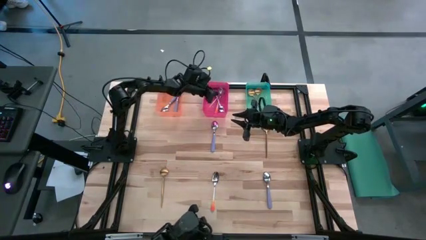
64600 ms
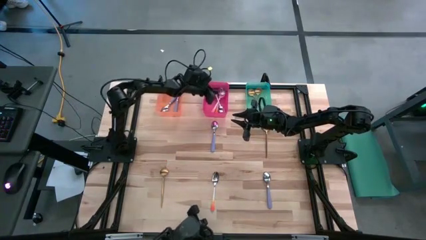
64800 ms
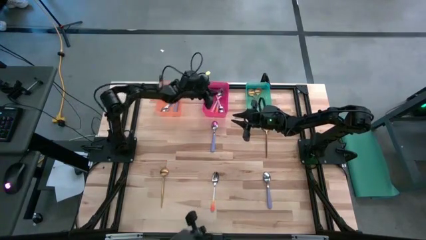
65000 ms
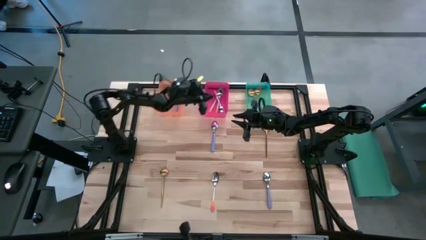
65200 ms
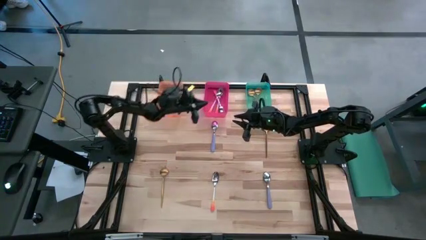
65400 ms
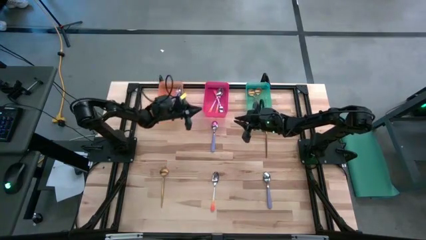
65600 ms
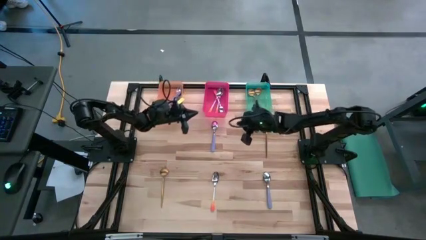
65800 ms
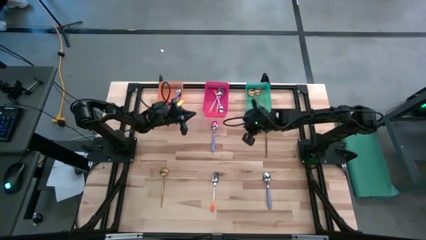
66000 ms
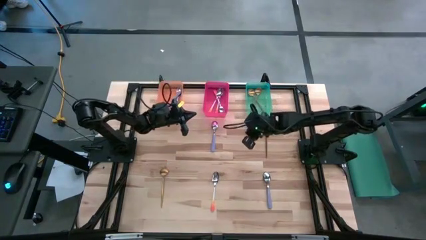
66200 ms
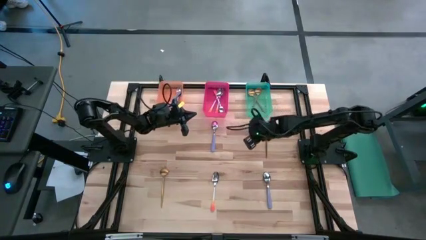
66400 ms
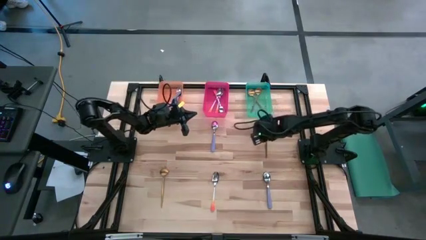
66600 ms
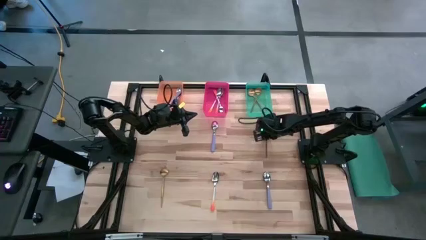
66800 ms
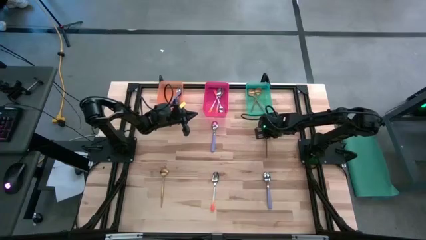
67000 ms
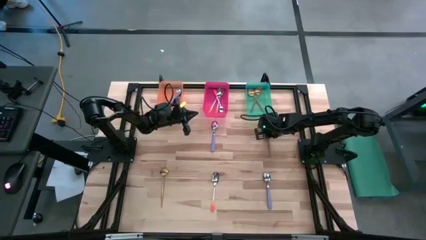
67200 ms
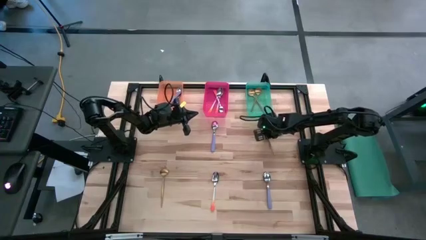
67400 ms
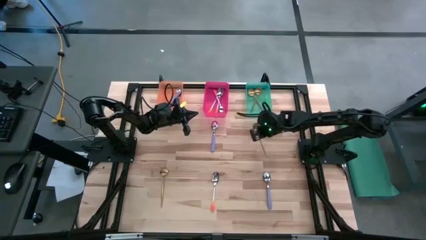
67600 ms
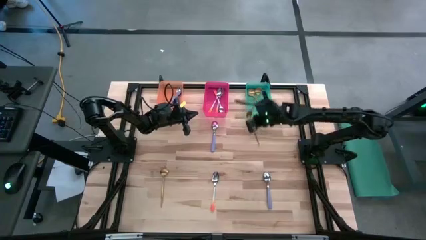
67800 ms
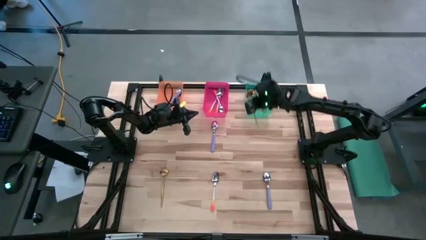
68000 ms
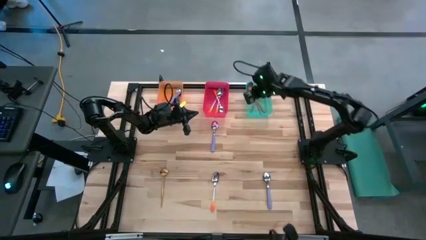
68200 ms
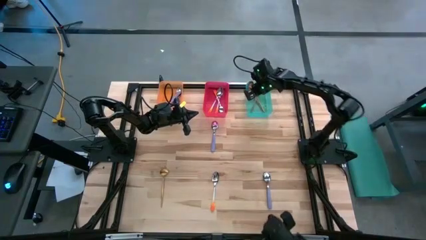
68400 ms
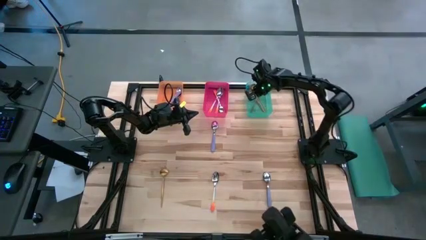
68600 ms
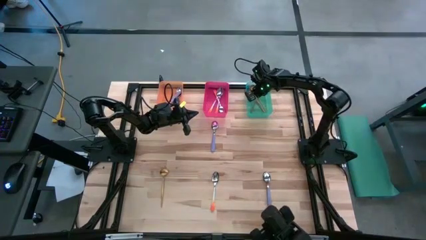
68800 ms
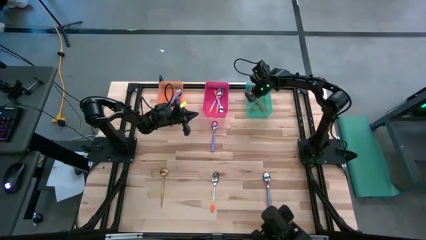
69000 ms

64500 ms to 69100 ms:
Task: Sort silverware by color (type)
Put the golden spoon into the green bin

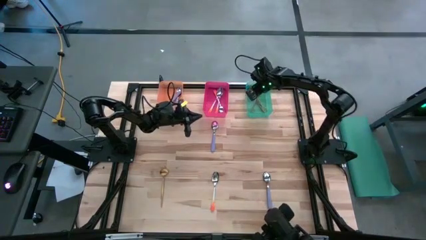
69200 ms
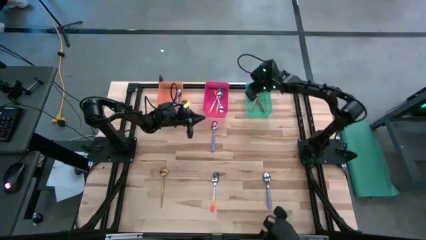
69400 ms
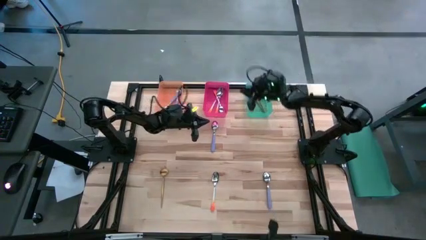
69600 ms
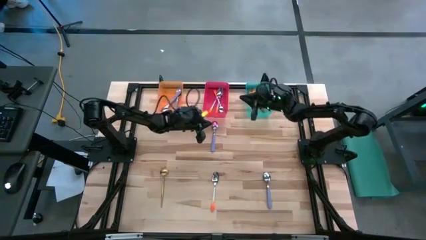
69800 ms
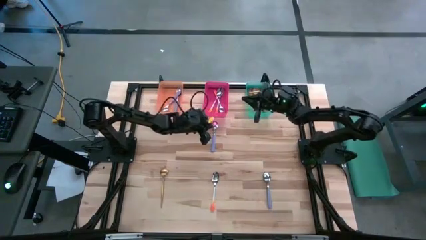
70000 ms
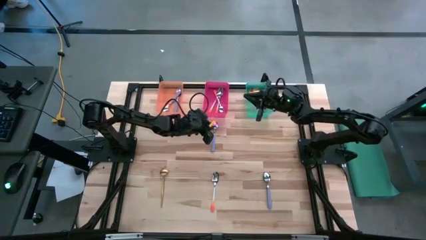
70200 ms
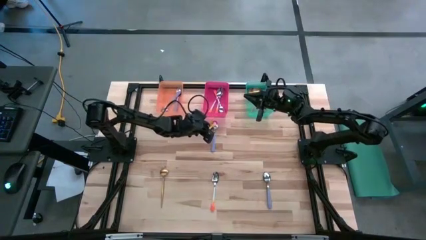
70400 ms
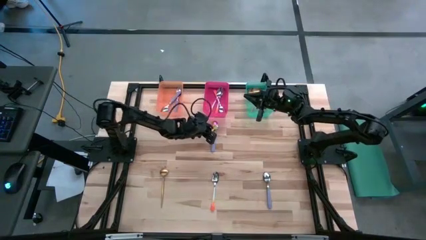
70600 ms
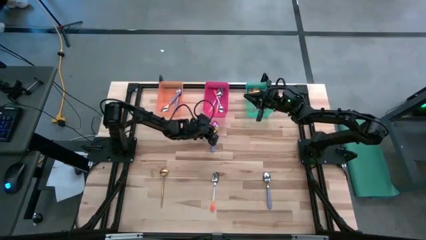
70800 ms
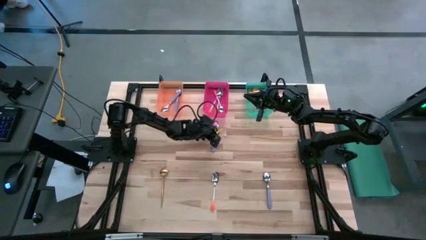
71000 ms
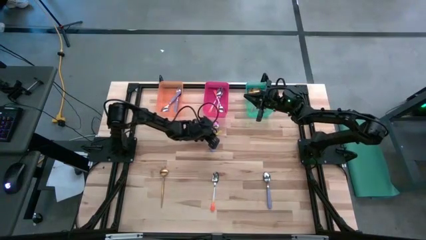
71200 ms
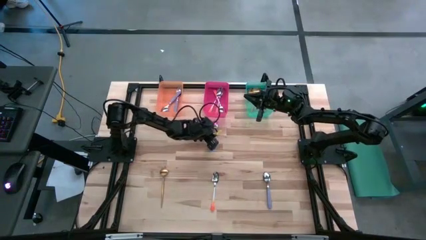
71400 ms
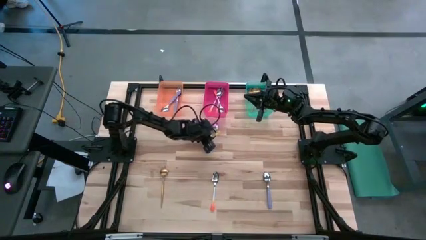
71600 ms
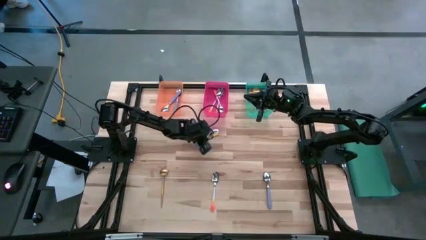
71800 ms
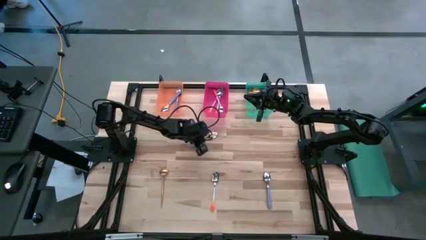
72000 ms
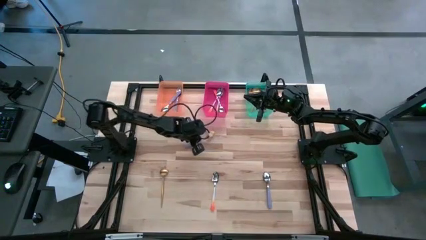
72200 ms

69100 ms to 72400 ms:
Put the purple spoon into the orange bin

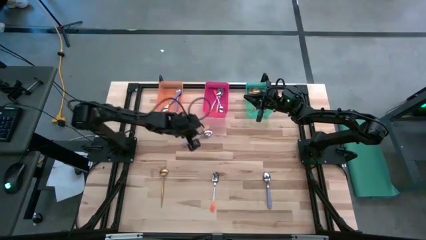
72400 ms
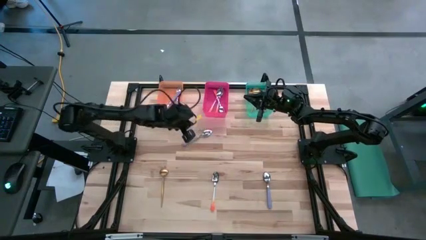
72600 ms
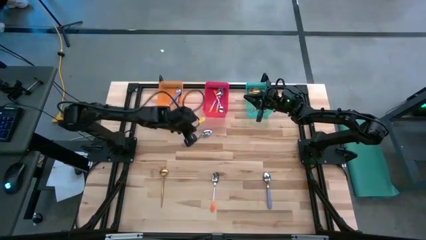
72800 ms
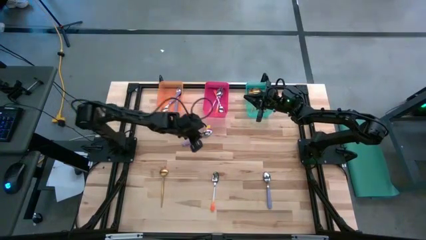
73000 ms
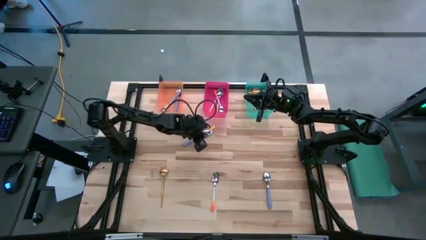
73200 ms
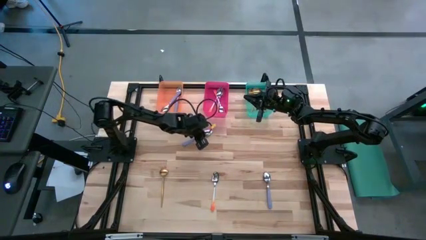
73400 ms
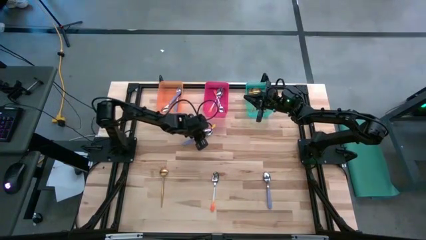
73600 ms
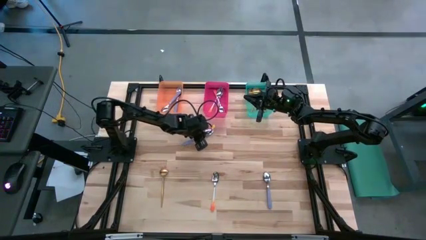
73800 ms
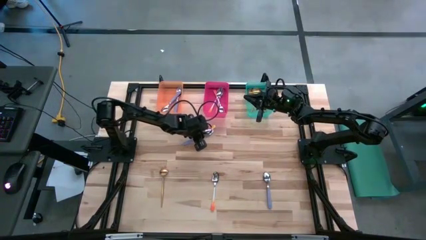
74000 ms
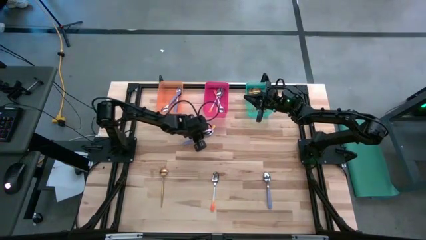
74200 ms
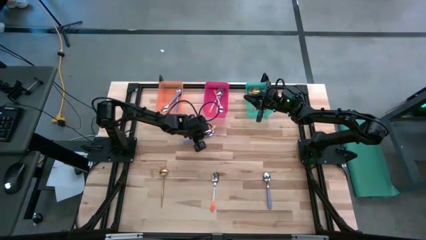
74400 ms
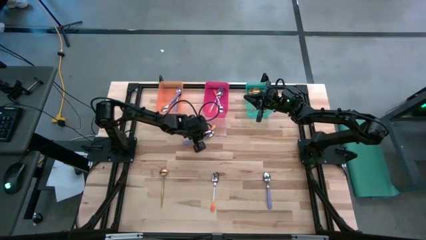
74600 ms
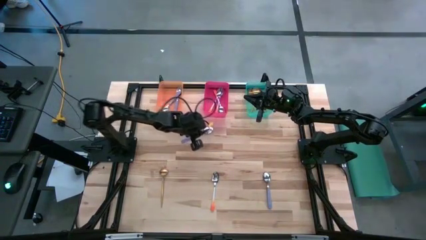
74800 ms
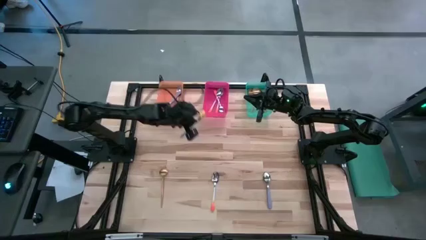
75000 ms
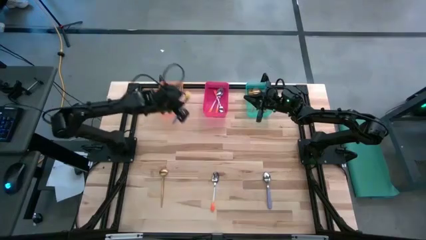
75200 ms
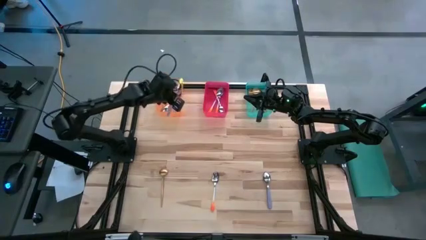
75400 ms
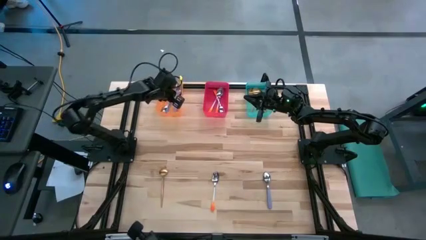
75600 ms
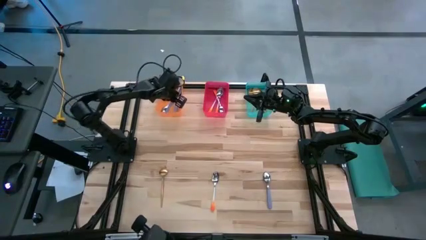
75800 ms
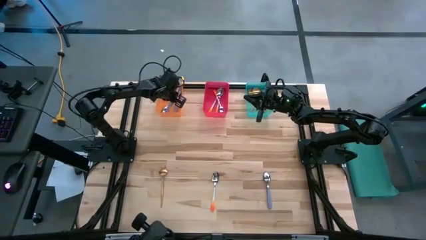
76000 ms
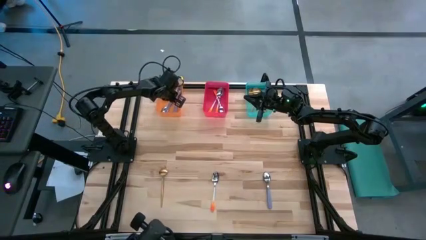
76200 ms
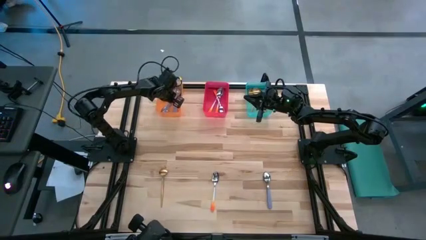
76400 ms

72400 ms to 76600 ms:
Put the purple spoon into the orange bin

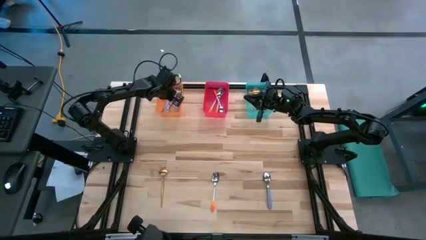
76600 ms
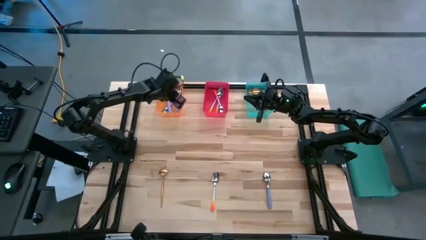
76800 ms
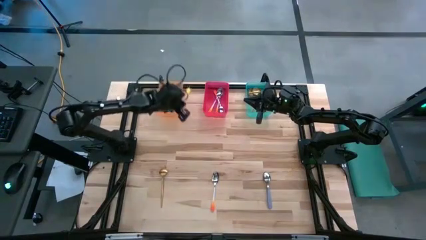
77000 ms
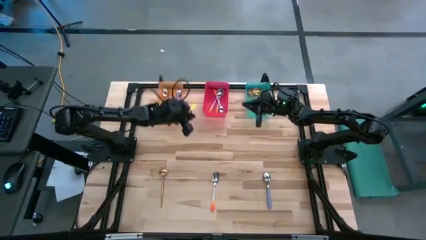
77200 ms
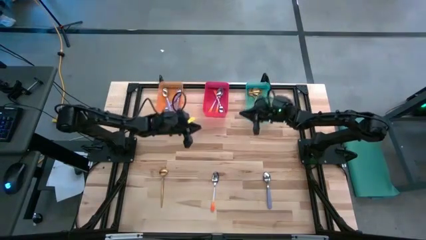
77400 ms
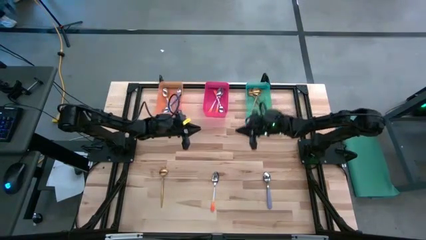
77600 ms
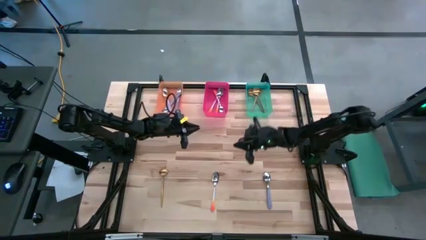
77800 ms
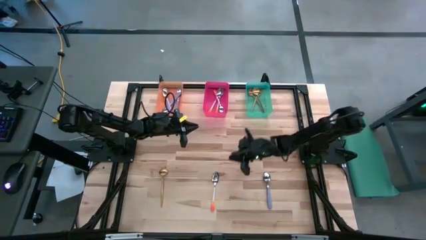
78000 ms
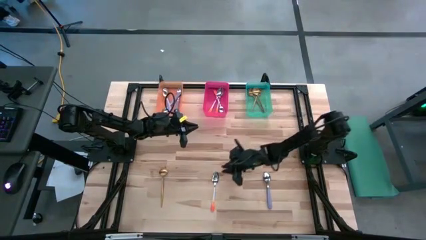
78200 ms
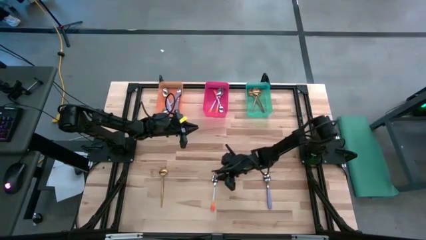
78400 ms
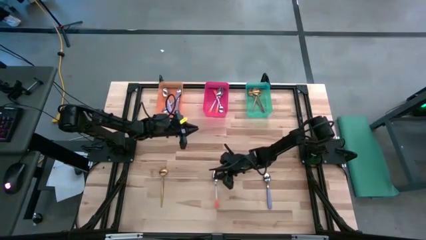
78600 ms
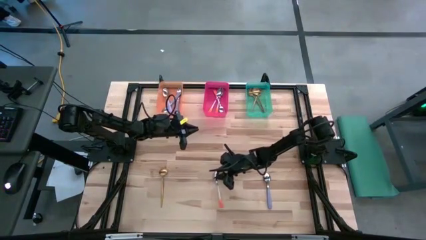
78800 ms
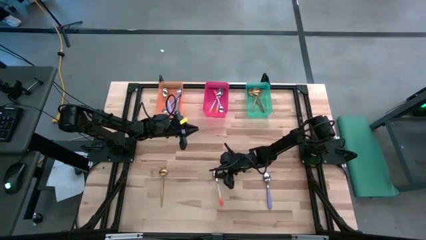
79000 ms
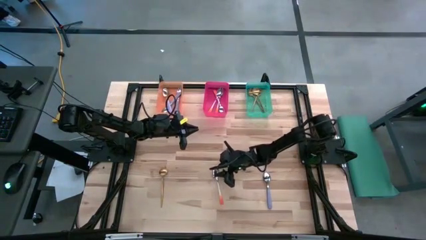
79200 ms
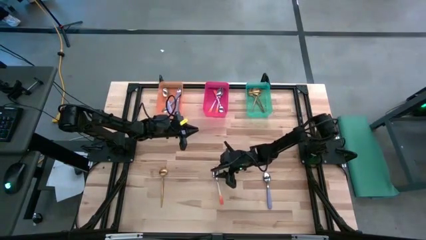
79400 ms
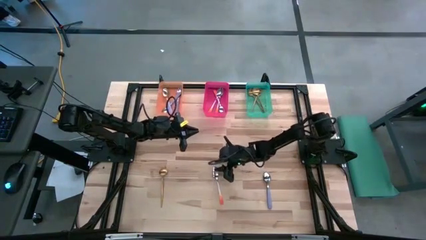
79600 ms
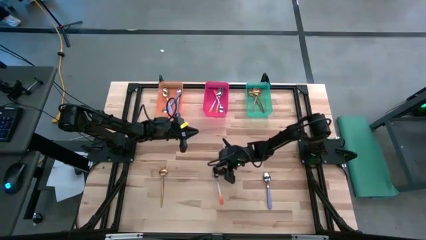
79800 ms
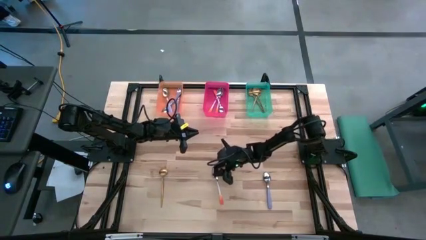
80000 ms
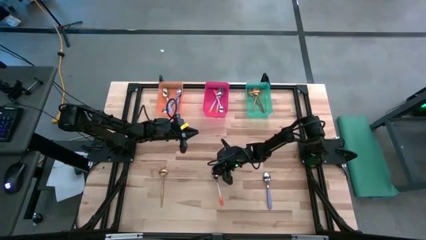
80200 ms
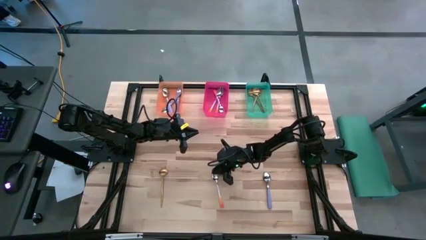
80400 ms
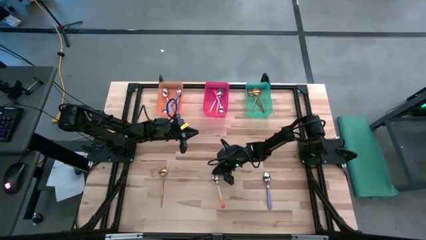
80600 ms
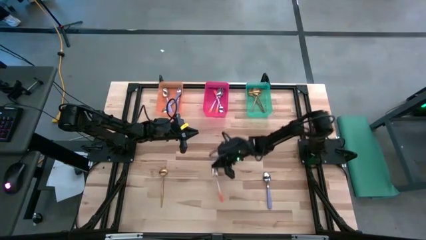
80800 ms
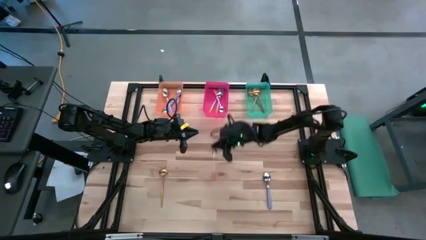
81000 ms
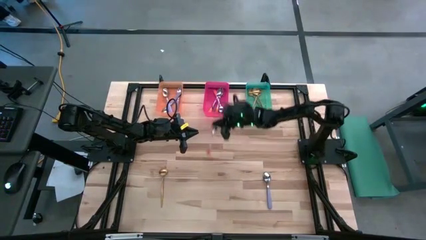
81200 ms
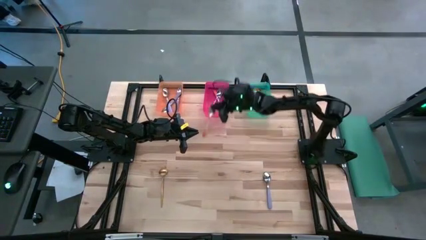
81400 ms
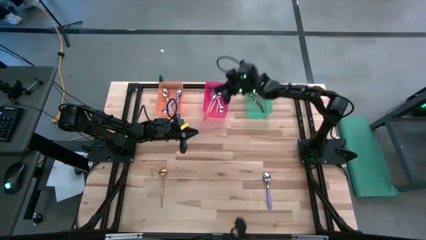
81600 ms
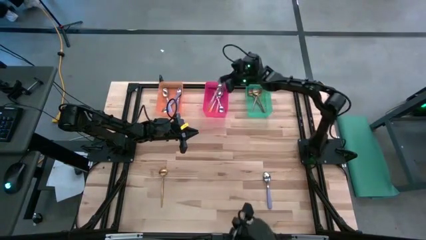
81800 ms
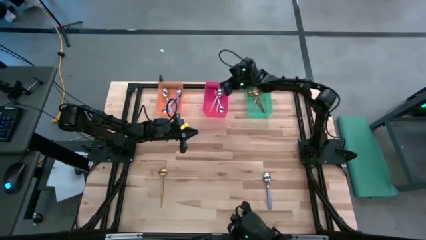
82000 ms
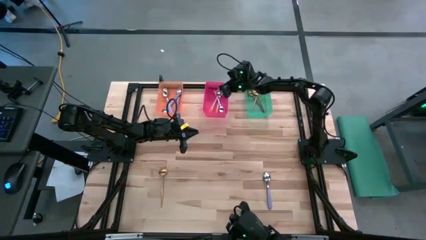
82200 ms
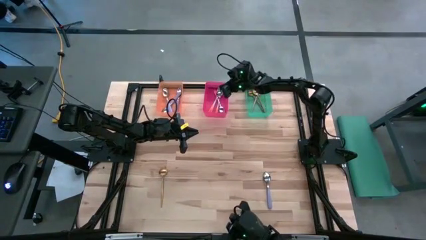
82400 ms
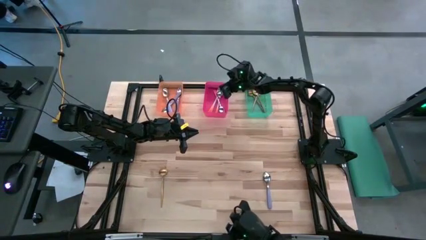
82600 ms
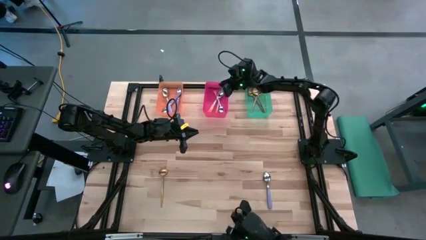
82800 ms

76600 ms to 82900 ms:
Put the orange spoon into the pink bin
